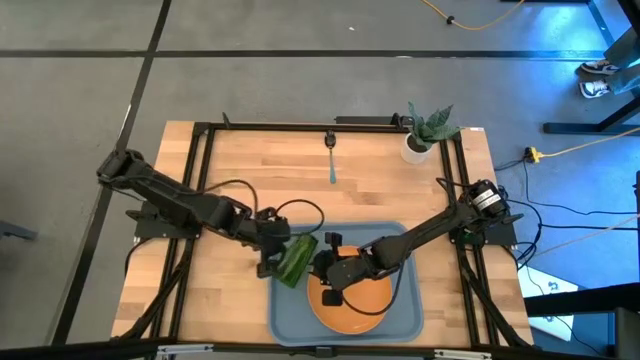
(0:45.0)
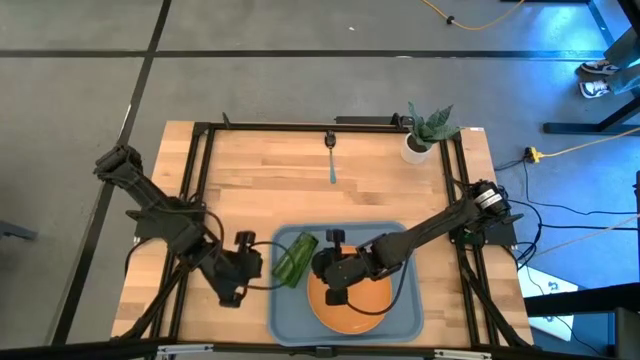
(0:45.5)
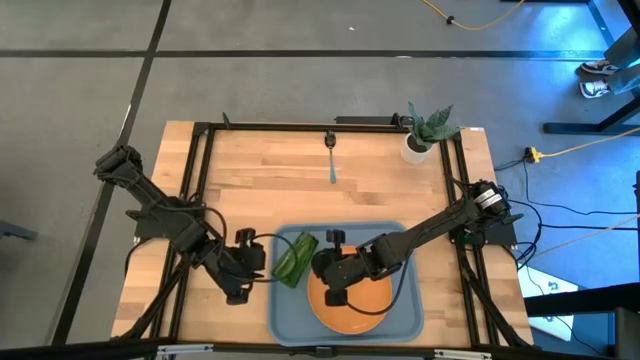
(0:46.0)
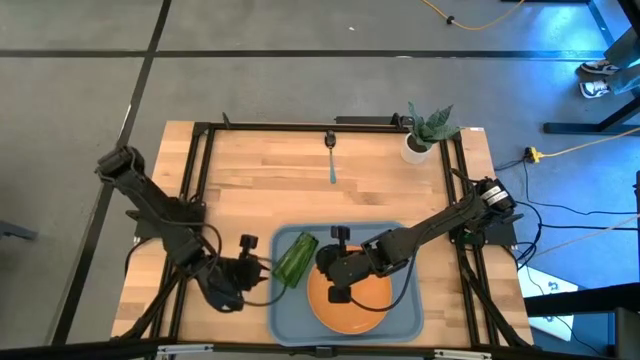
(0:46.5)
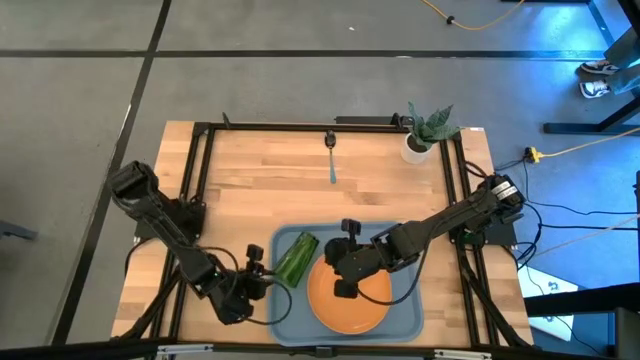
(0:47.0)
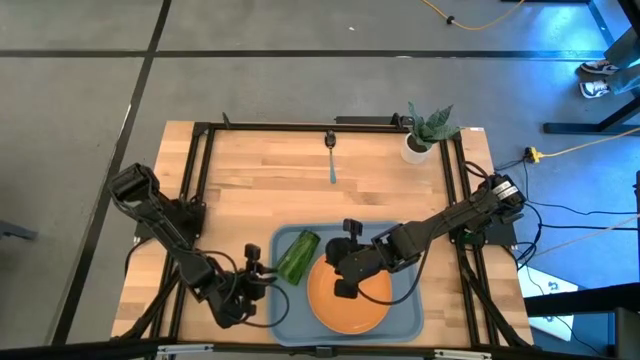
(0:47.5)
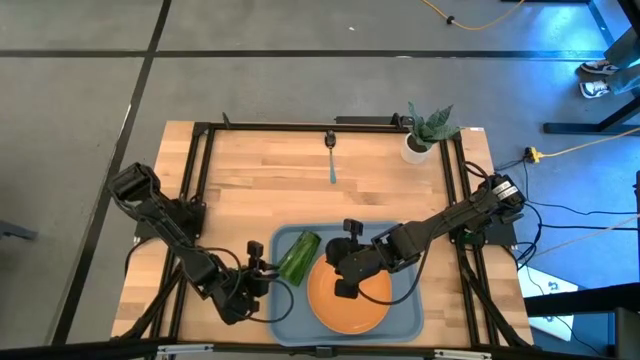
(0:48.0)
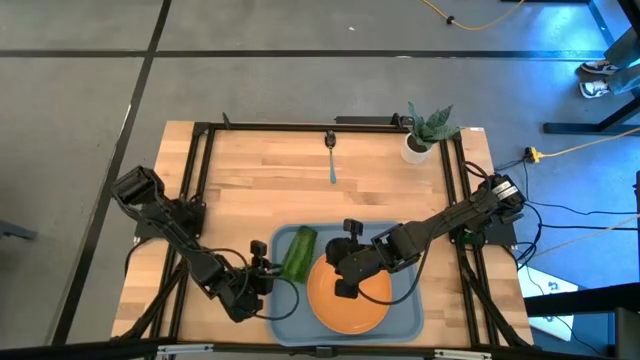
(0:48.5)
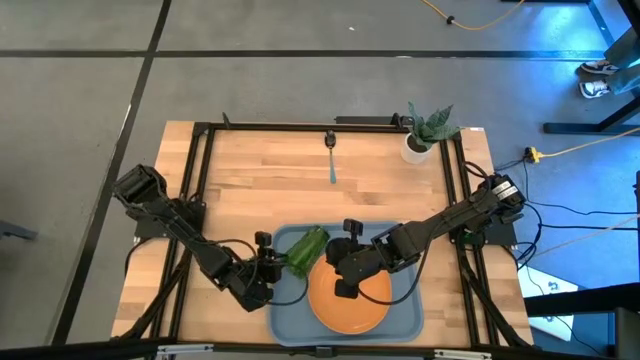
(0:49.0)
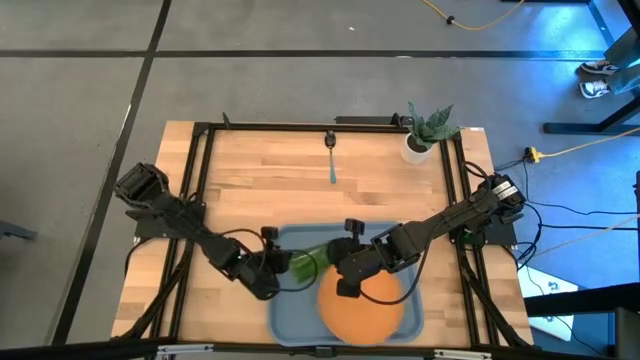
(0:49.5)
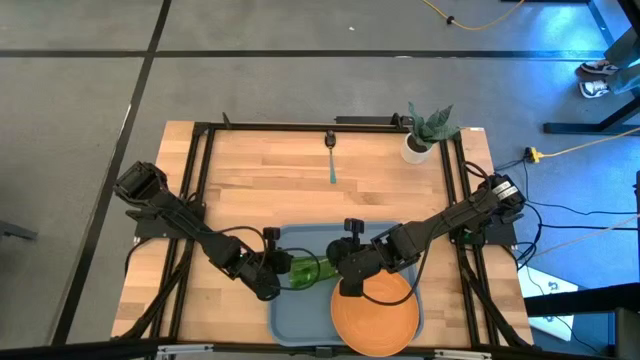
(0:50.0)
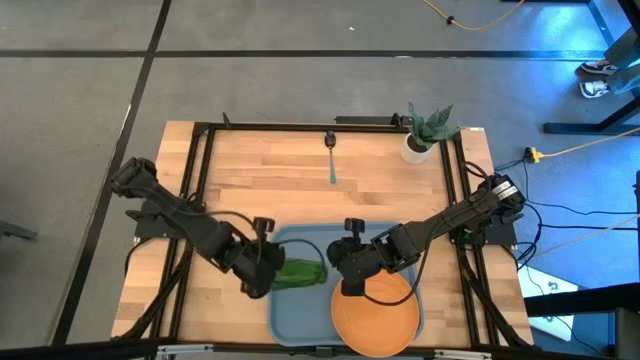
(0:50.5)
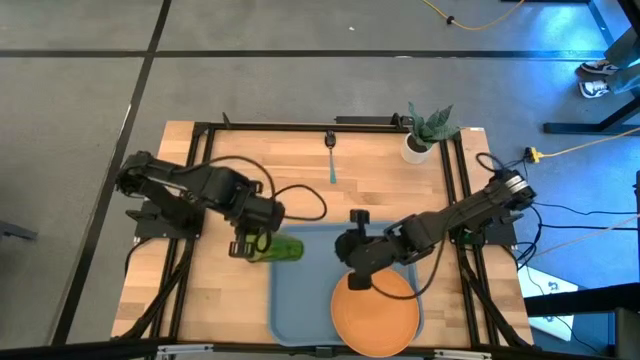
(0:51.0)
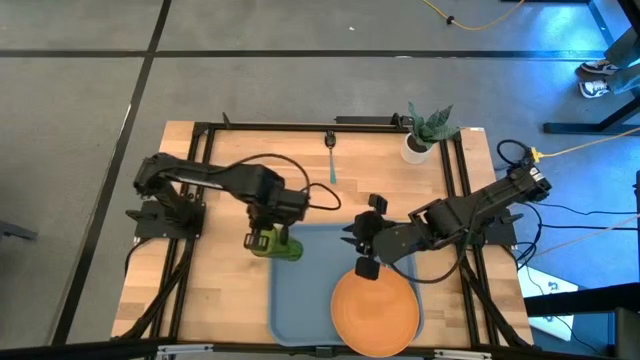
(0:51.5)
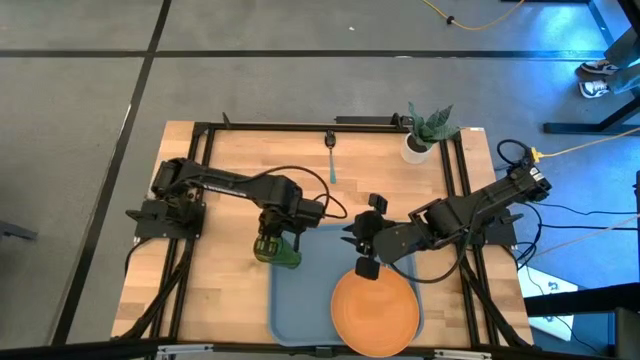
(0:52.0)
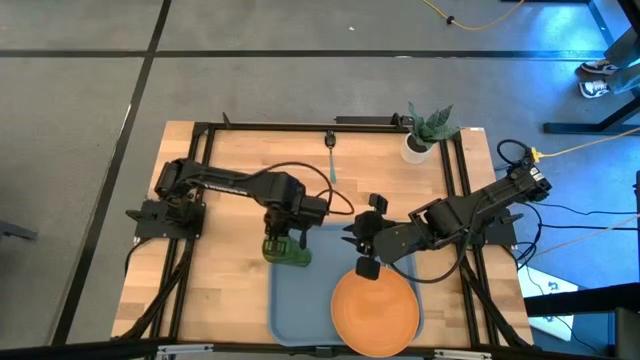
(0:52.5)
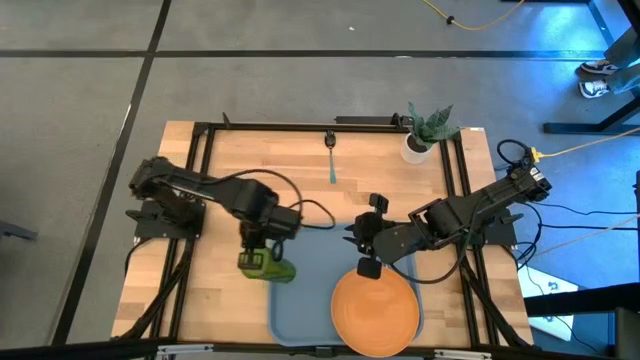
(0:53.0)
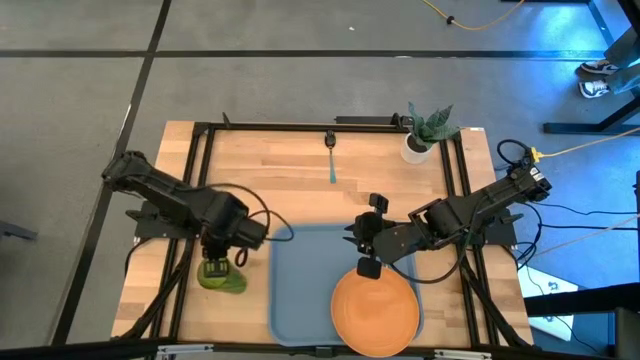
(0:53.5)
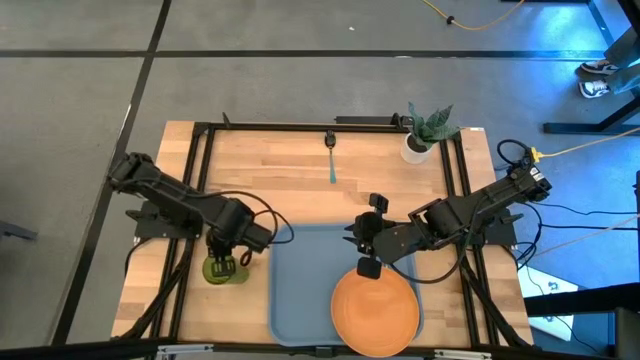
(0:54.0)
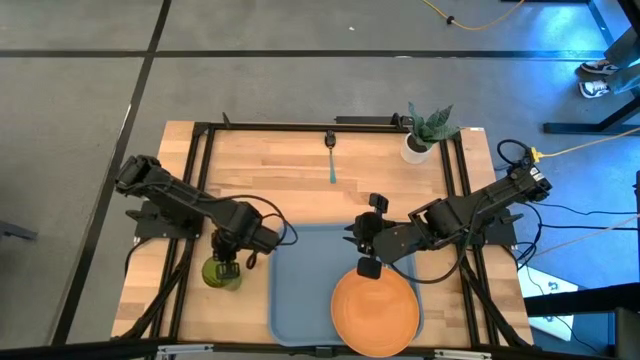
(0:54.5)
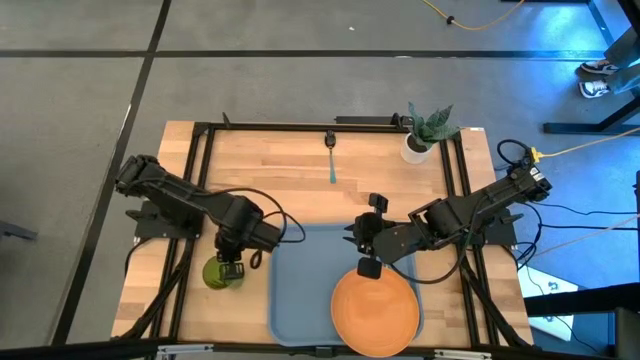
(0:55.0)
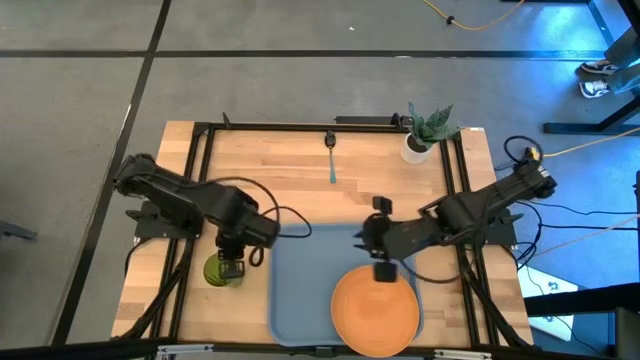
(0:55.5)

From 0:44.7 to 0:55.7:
Task: Pick and place plate/cup/fork/spoon on tray
Remove the glass cup from the tray

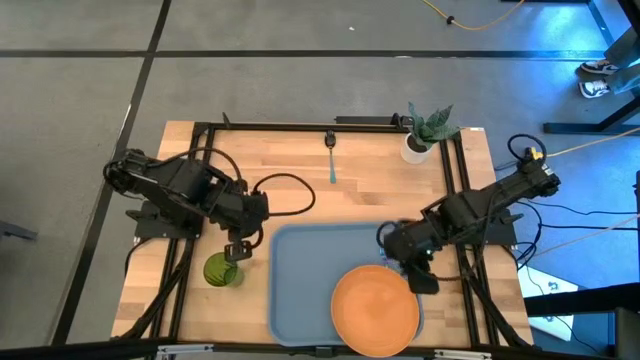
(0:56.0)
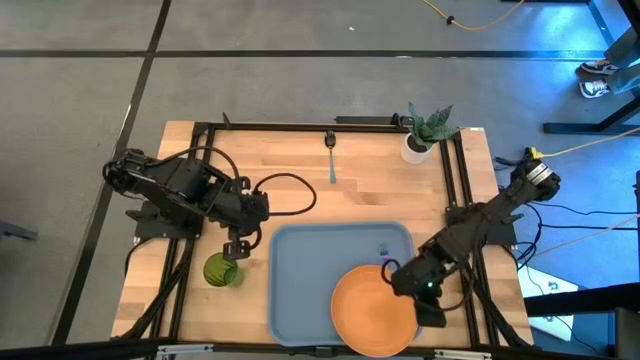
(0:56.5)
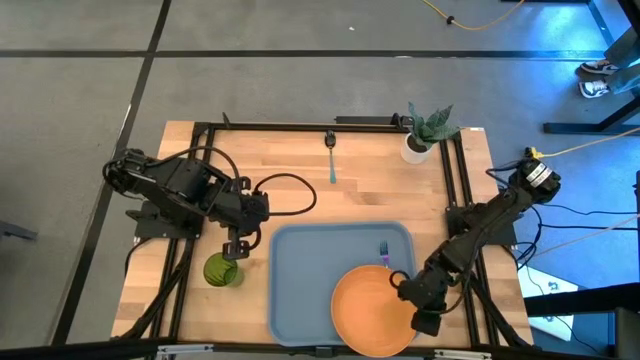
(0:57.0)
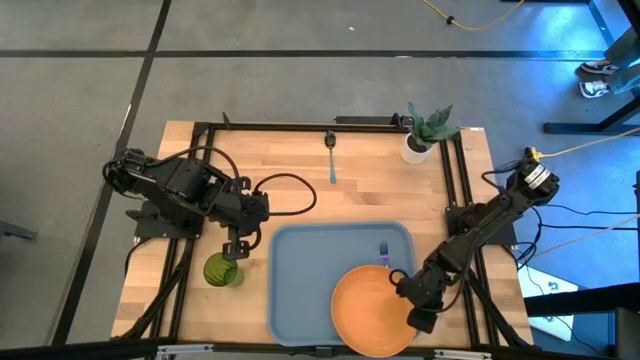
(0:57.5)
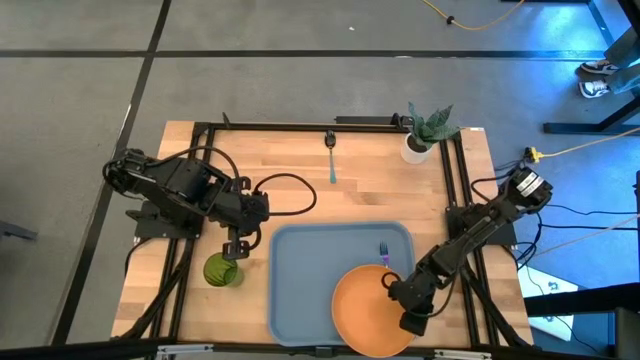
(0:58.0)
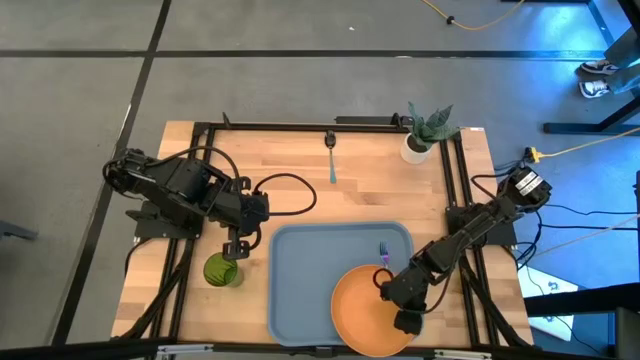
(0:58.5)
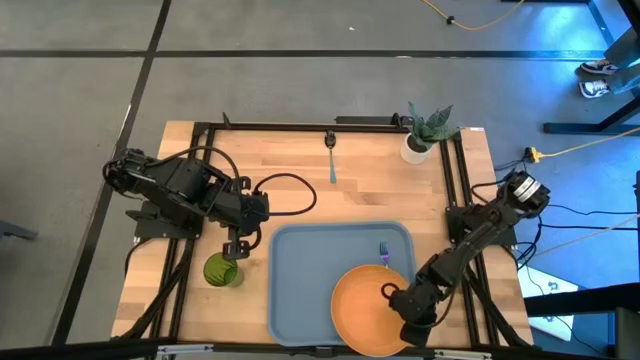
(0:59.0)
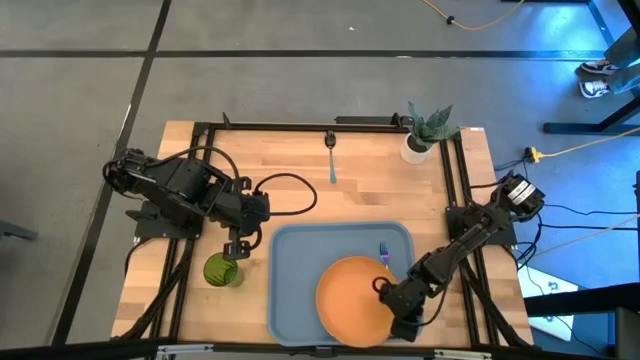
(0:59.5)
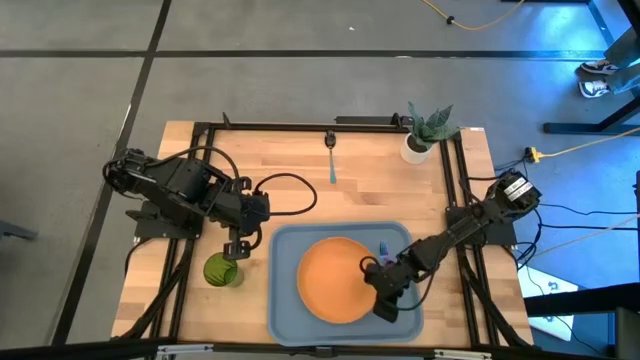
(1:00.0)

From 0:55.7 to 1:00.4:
Adjust the orange plate on the gray serving tray

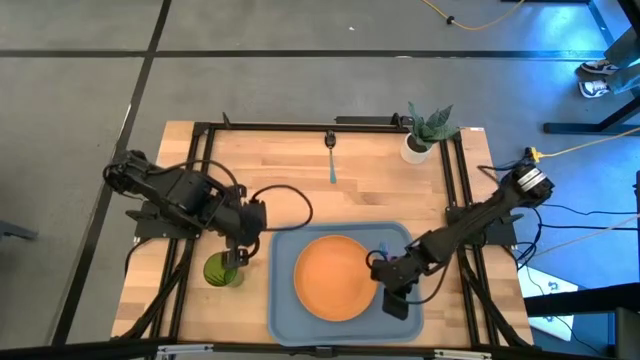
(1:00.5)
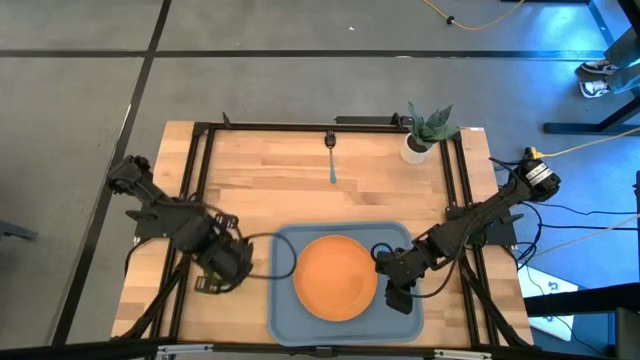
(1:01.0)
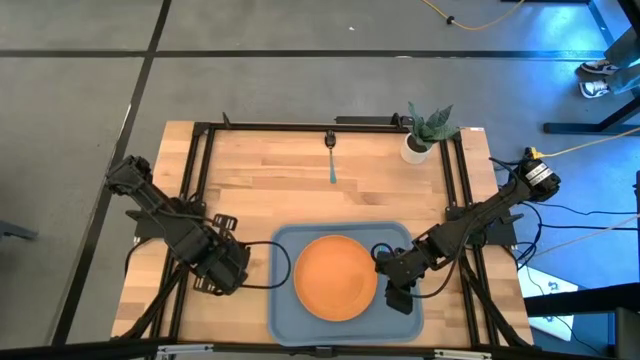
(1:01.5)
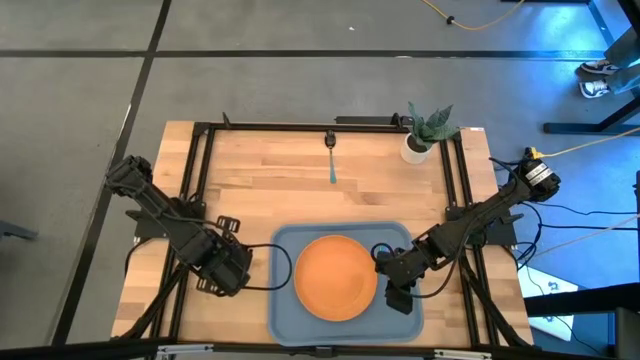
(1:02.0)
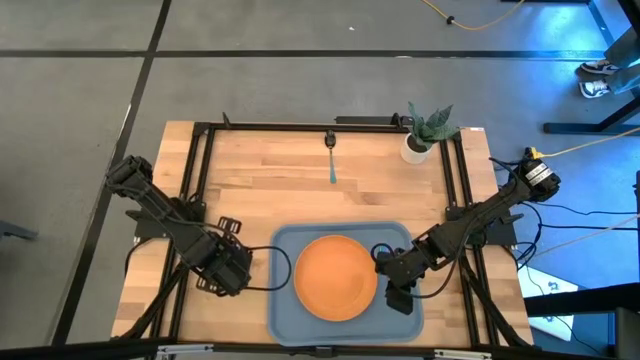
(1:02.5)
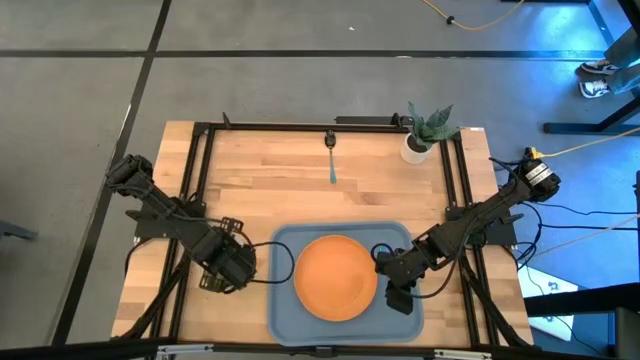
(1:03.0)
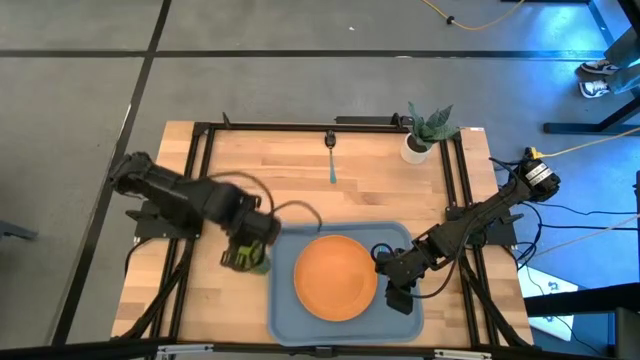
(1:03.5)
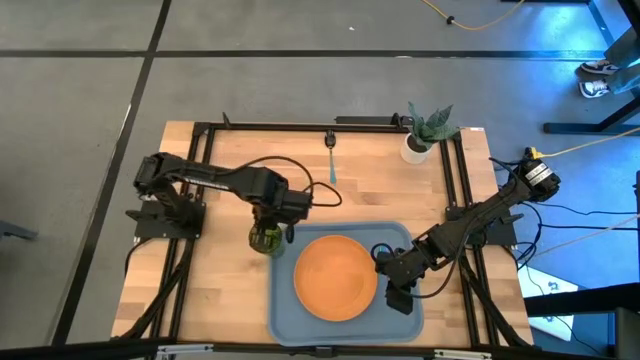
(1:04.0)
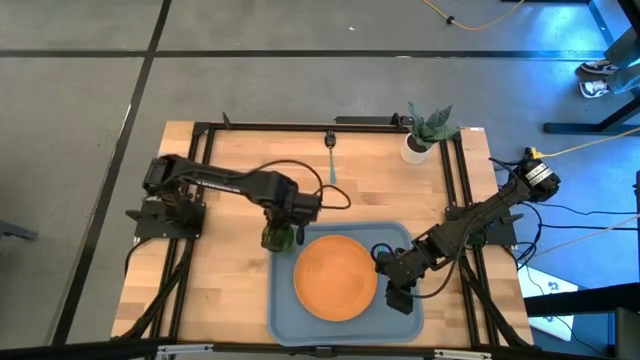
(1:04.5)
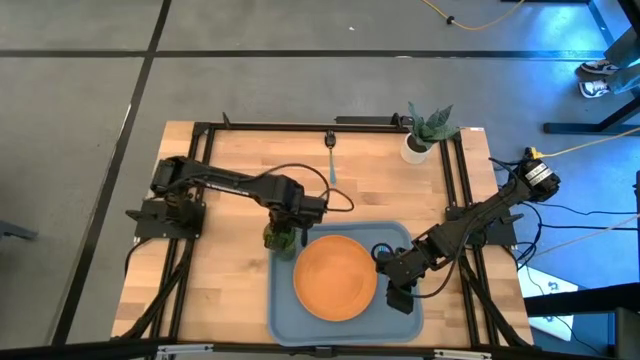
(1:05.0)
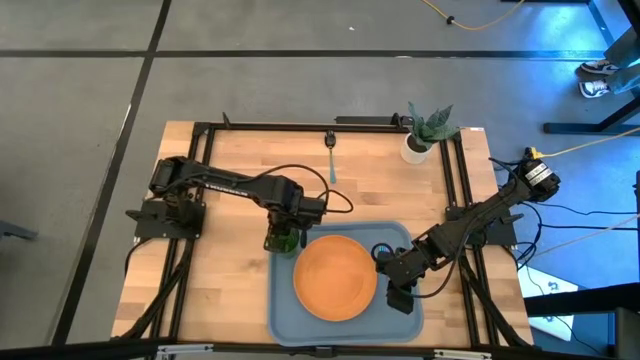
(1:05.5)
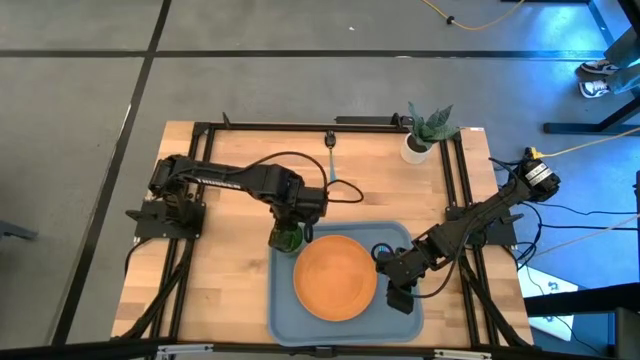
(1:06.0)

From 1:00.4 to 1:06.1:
Put the green cup on the top left of the gray serving tray
